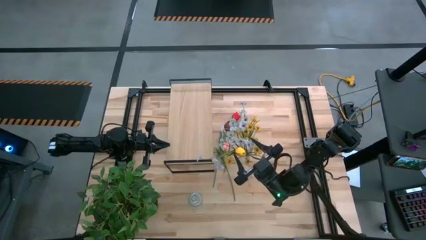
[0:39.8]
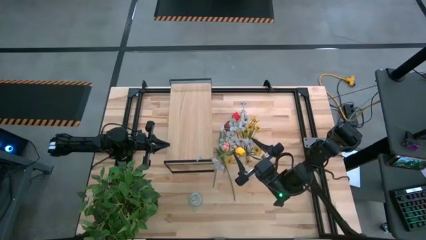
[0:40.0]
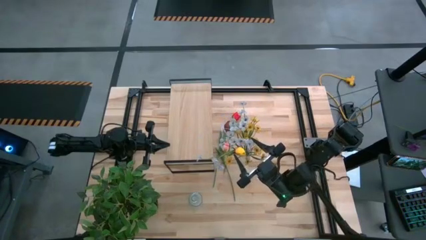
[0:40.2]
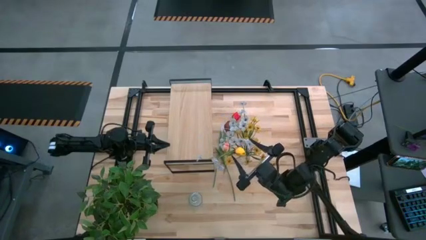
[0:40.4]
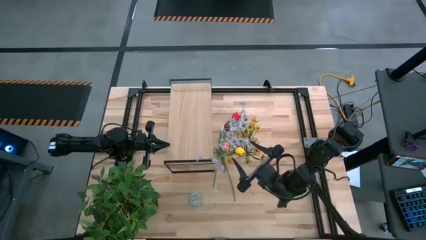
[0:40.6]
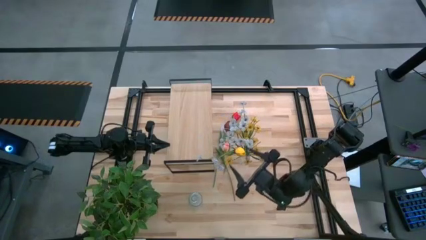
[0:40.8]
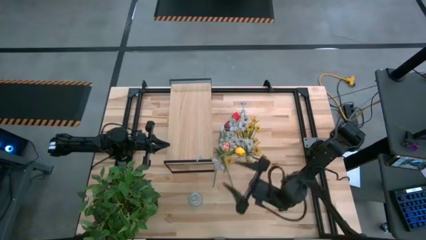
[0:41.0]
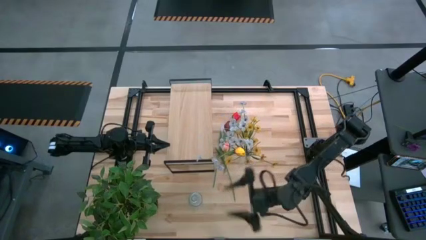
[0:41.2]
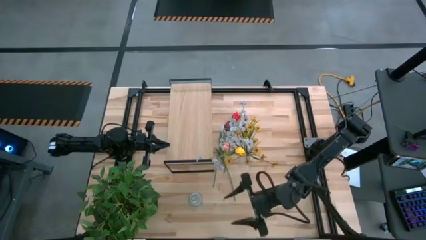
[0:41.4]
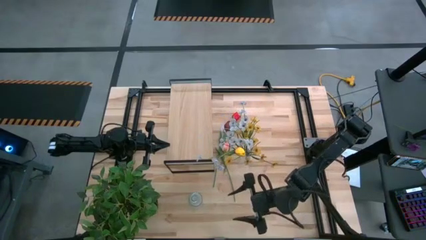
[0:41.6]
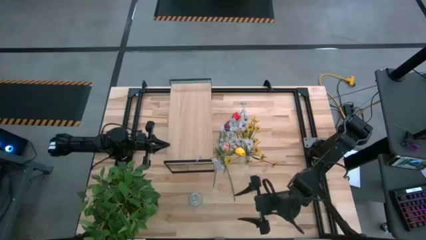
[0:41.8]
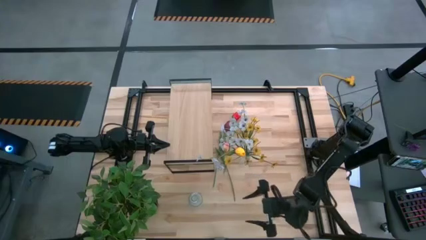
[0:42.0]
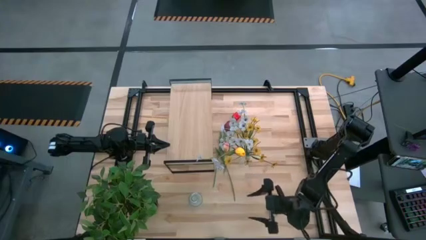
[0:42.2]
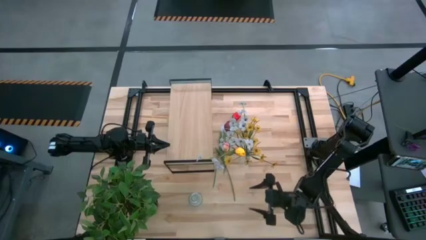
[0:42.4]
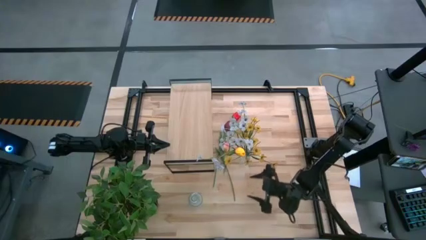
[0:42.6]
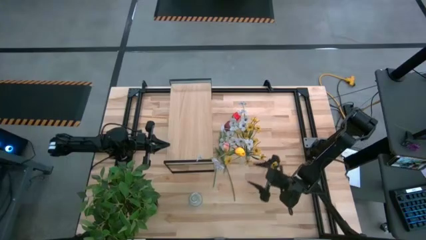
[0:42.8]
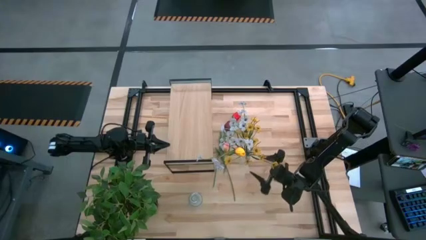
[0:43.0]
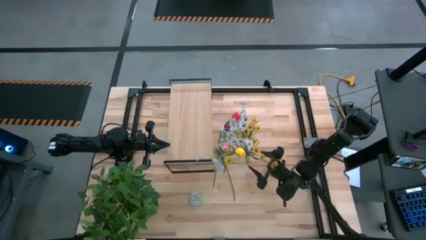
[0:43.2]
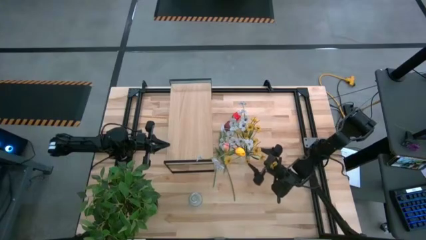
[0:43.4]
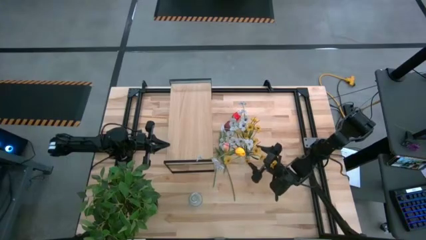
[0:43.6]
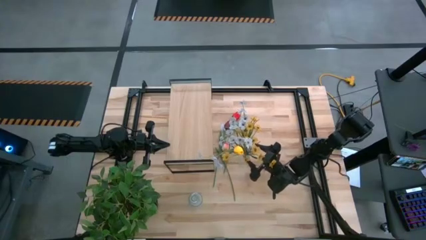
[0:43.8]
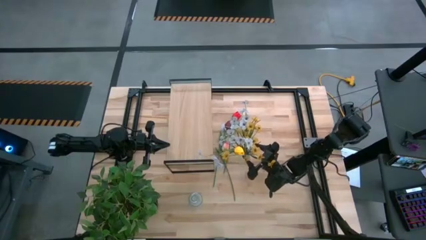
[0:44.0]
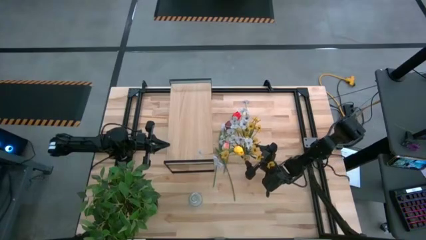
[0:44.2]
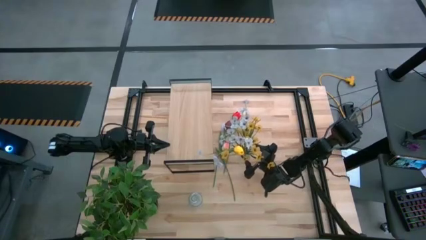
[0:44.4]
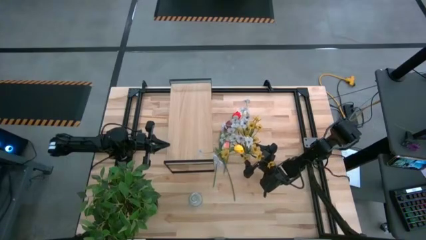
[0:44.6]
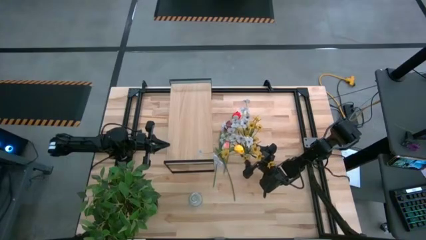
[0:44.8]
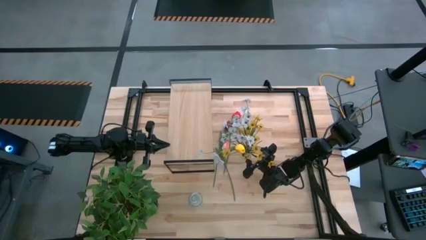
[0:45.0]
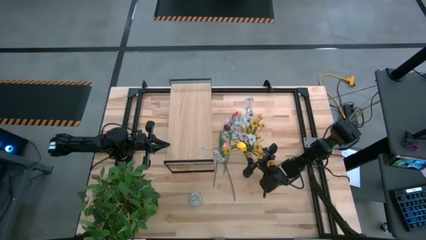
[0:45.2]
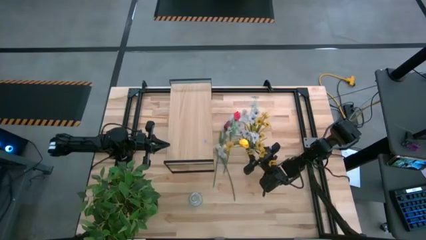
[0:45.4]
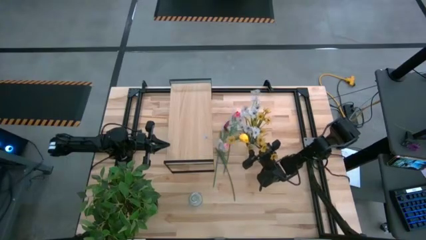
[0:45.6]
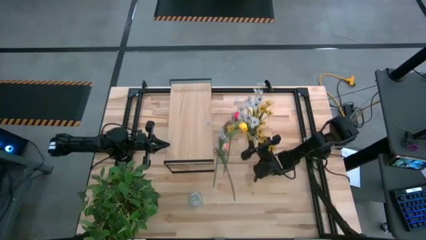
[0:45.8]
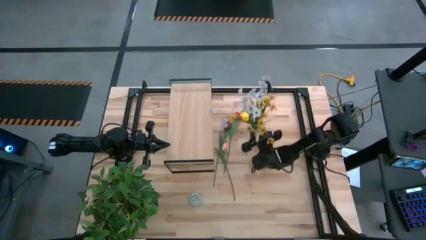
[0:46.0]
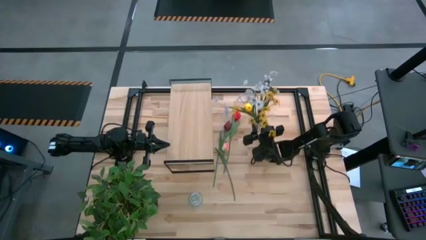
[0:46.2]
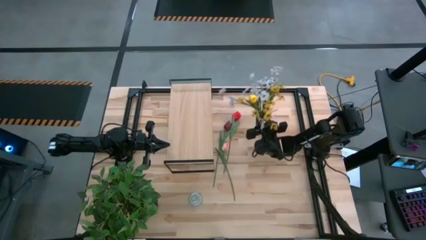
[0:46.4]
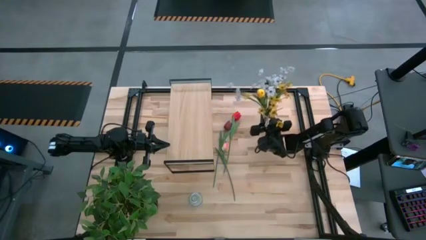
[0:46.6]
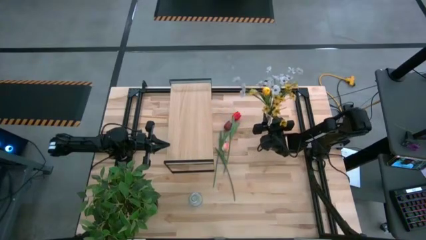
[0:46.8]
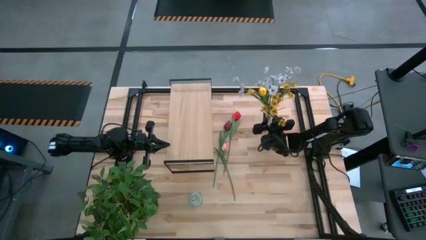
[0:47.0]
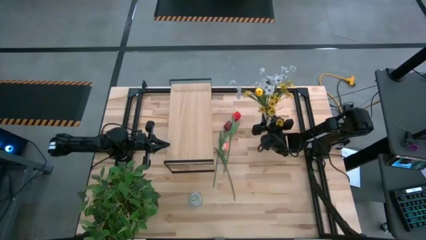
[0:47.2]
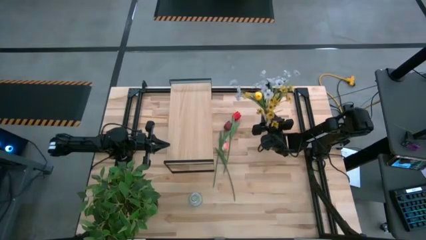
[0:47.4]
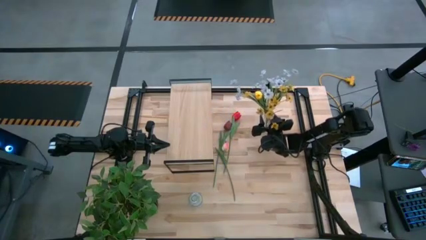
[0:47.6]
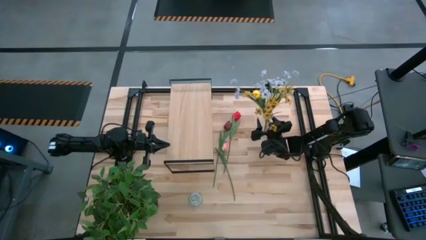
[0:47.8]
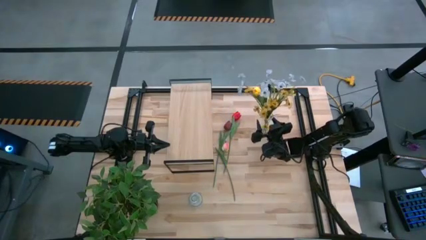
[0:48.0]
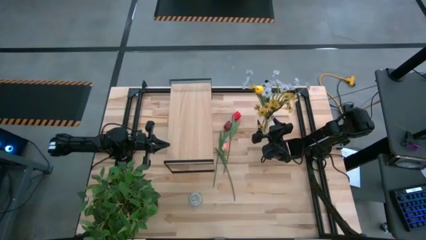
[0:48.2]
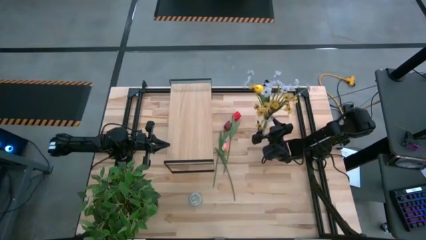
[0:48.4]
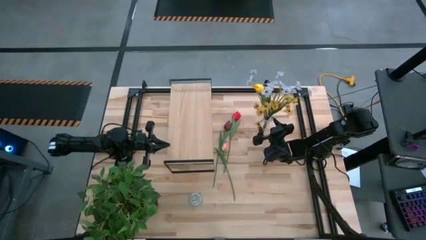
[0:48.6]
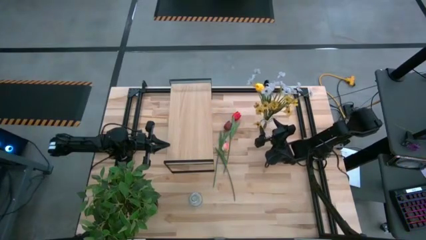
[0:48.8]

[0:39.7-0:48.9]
Task: Pick and place flowers into a vace then onto a shelf
Move the top transparent vase to the top right of the table

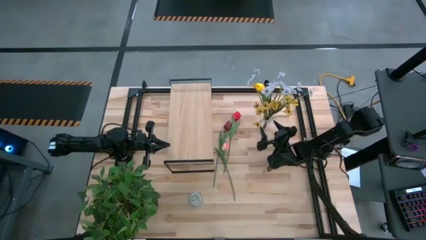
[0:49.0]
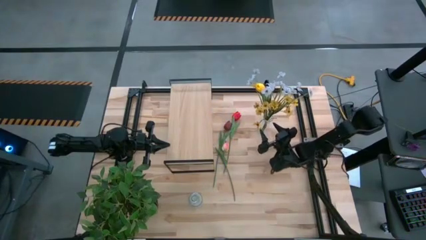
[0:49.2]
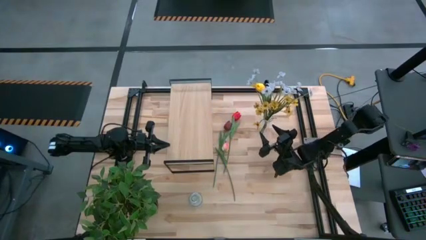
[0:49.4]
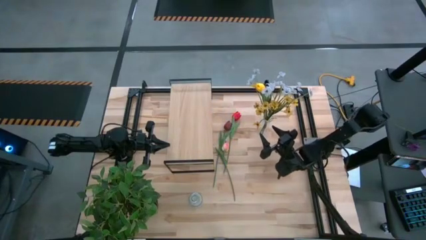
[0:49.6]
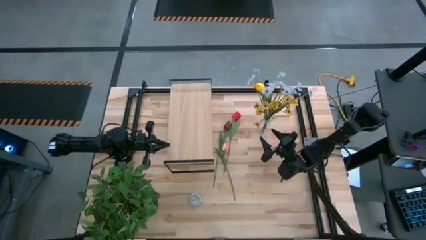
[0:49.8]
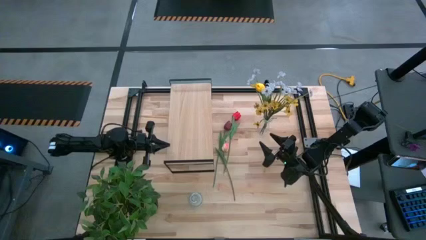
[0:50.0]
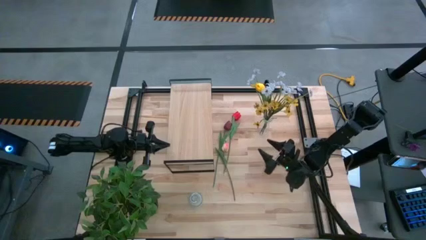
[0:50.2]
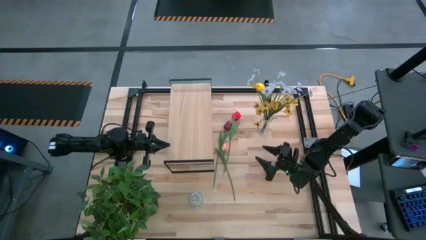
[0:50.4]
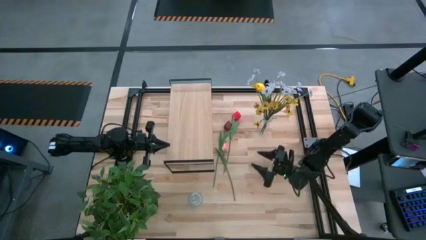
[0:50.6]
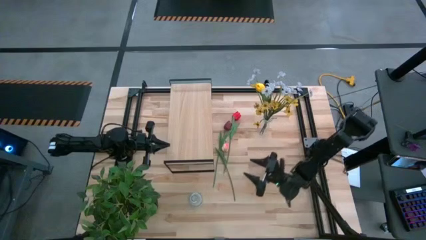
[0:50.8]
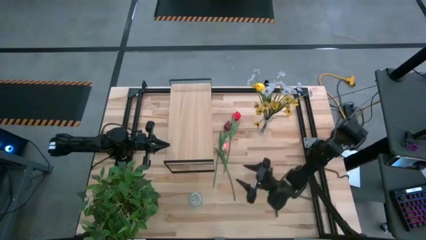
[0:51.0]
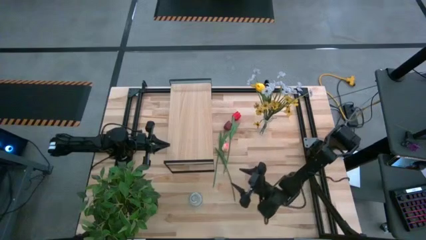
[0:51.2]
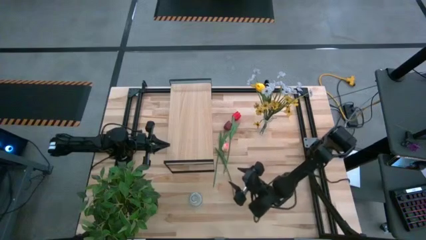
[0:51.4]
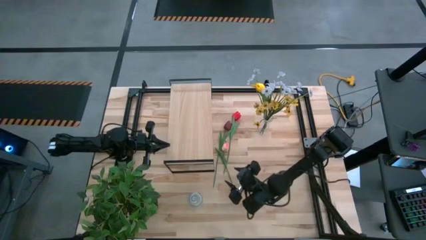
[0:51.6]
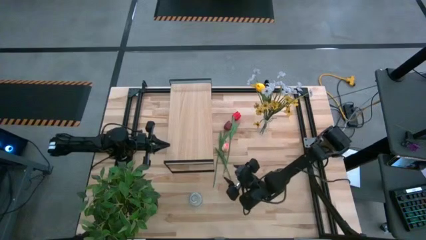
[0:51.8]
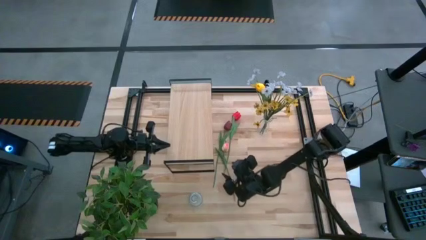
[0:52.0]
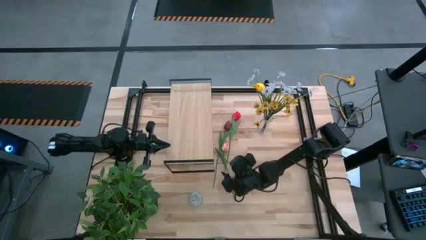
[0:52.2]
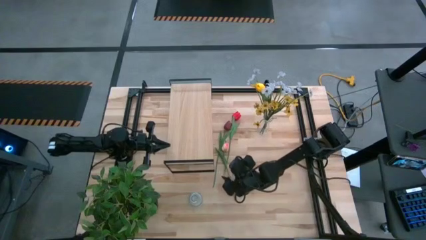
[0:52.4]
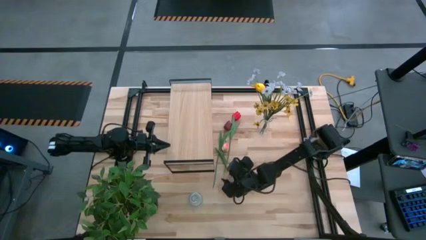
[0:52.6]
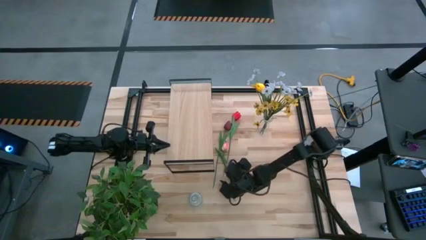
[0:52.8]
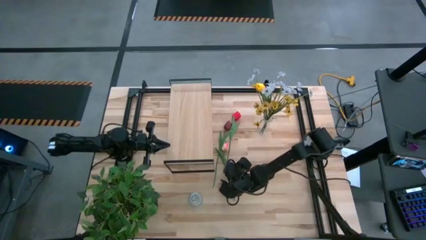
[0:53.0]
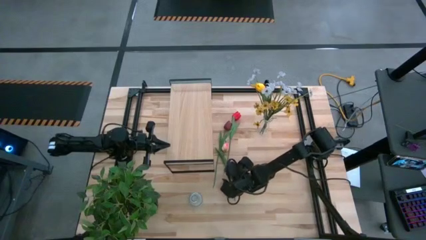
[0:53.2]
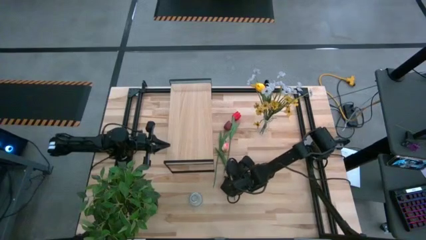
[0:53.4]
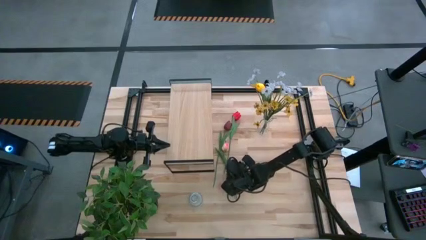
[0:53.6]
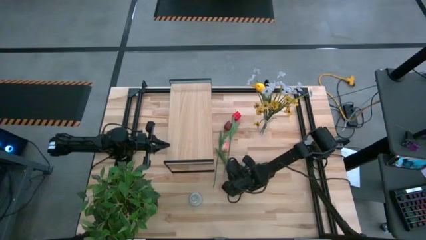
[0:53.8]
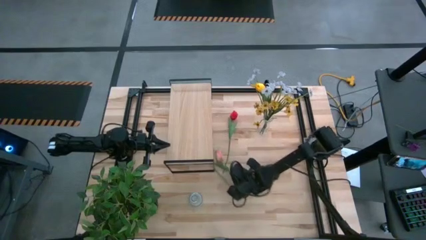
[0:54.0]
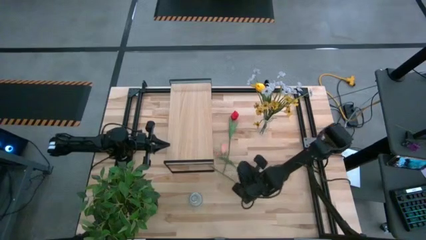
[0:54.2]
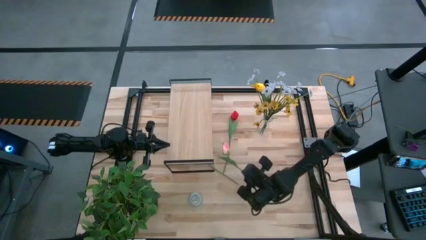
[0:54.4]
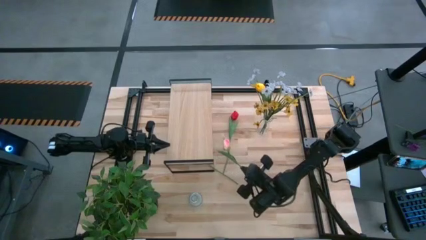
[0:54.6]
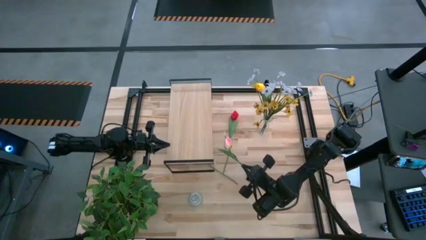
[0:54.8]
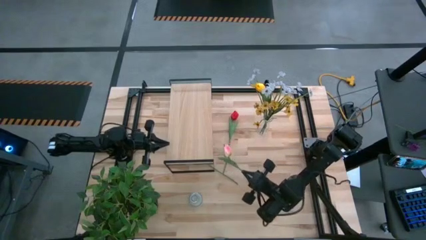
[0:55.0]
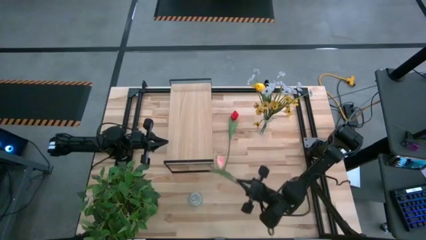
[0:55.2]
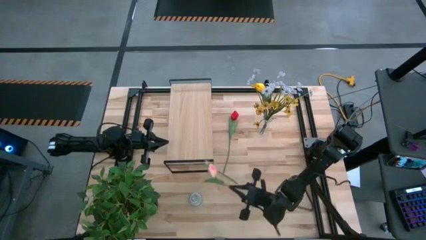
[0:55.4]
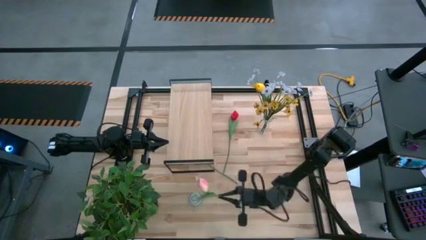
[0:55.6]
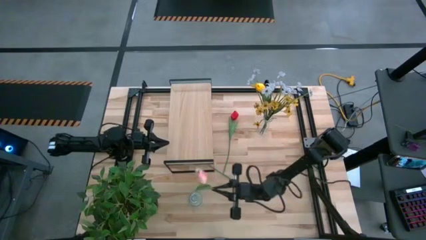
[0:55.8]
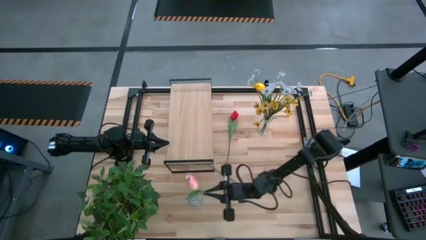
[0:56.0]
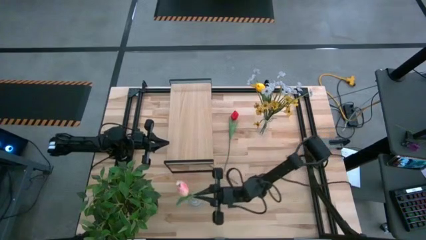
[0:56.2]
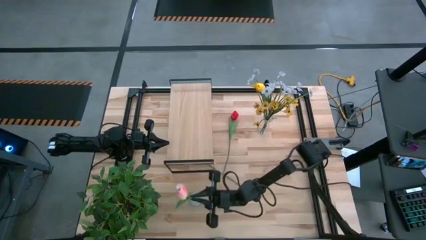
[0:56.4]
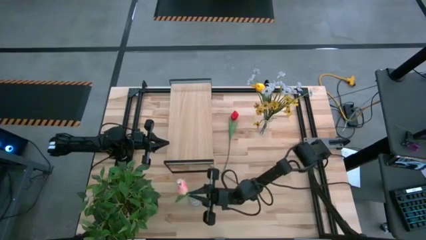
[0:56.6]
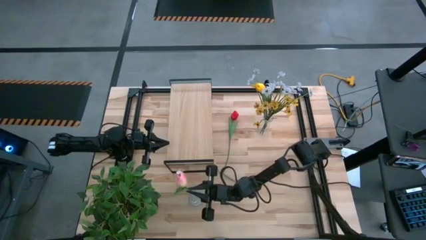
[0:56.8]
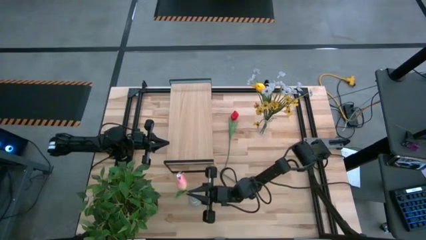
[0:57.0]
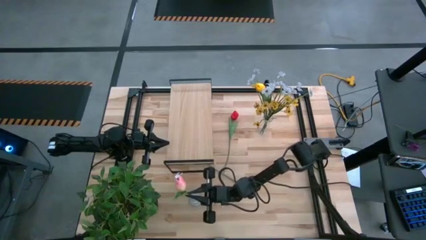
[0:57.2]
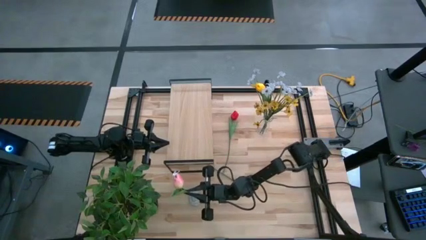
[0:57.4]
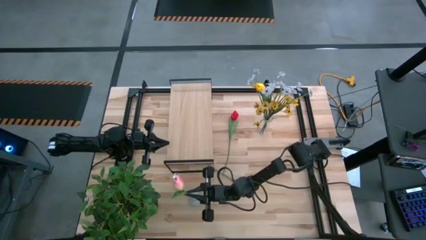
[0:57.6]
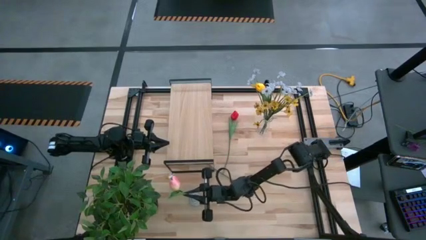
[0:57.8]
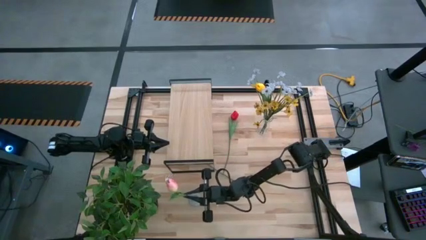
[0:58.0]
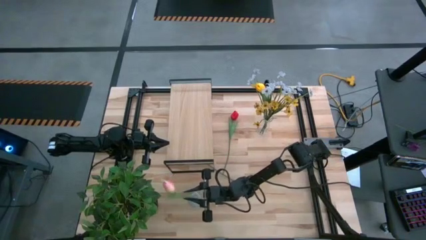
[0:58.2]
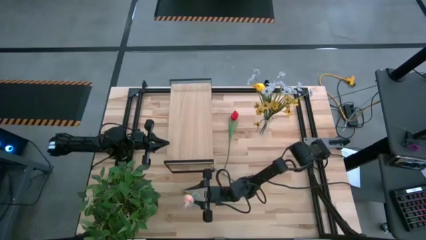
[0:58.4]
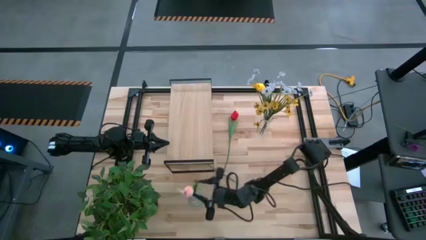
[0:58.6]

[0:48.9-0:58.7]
Put the pink flower into the bottom transparent vase
